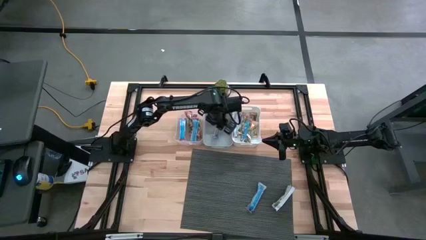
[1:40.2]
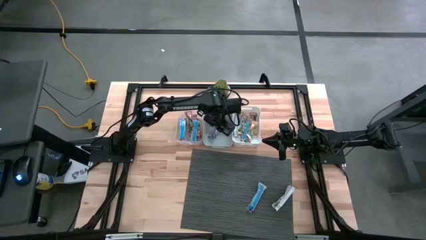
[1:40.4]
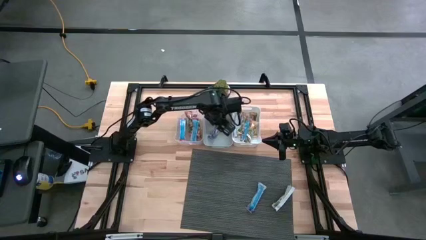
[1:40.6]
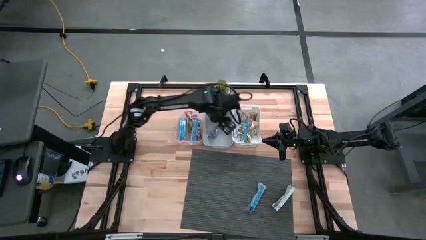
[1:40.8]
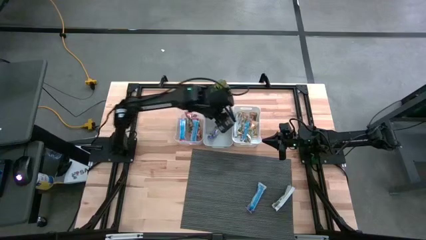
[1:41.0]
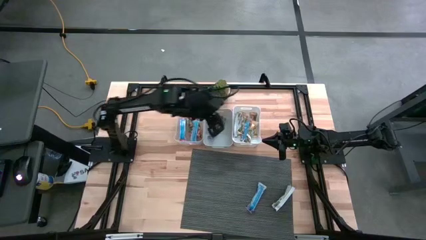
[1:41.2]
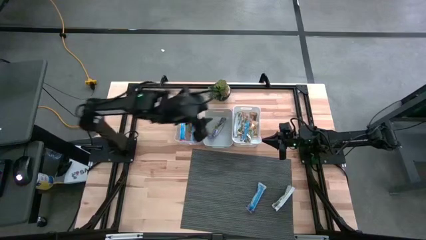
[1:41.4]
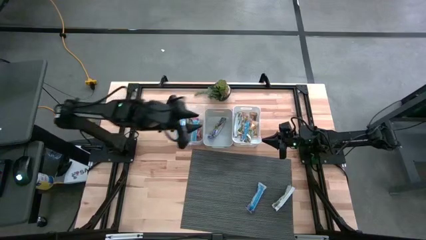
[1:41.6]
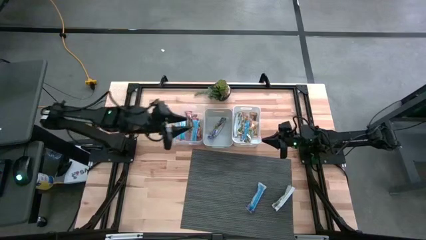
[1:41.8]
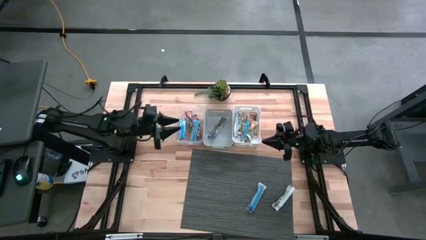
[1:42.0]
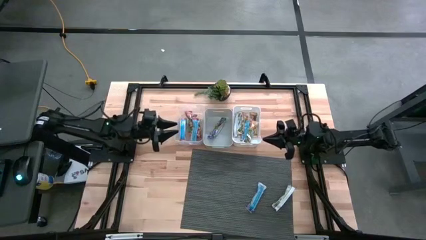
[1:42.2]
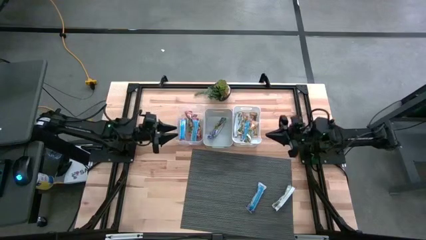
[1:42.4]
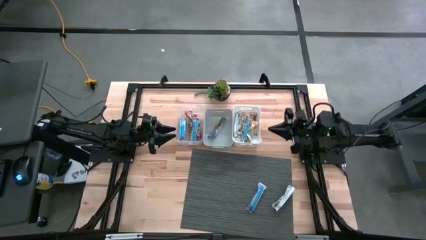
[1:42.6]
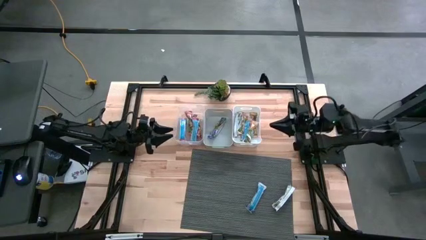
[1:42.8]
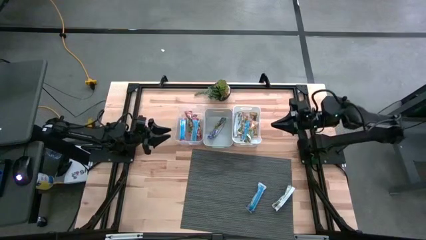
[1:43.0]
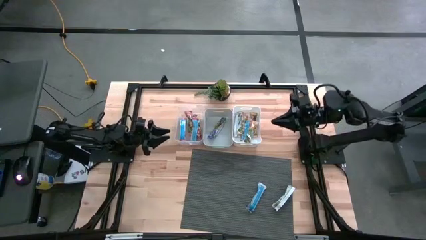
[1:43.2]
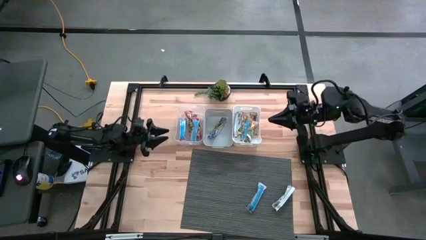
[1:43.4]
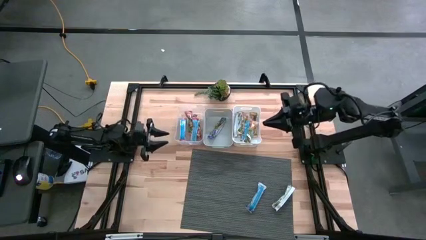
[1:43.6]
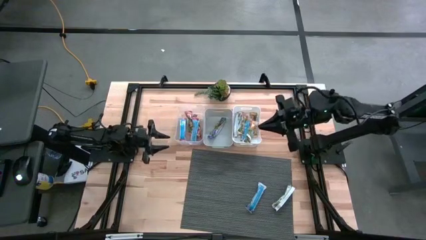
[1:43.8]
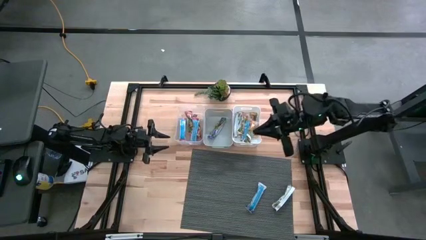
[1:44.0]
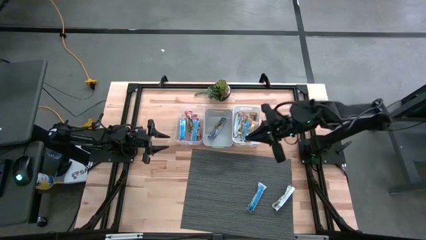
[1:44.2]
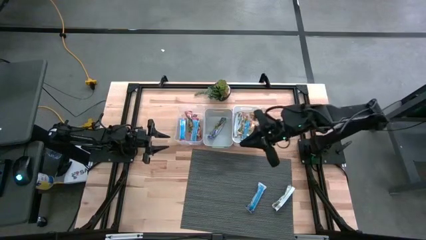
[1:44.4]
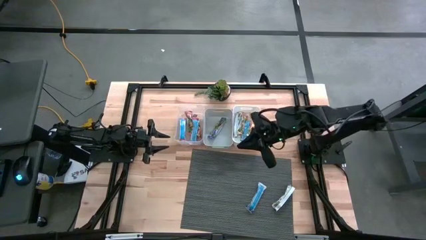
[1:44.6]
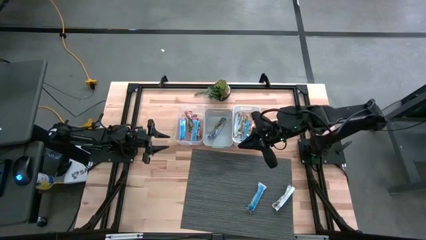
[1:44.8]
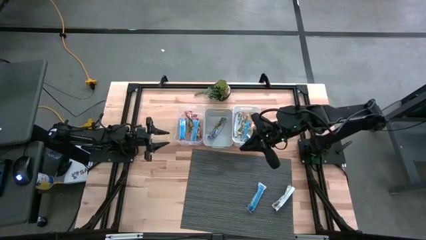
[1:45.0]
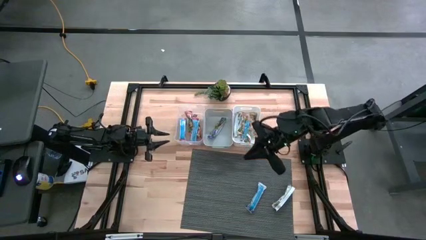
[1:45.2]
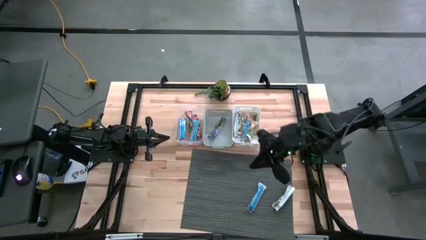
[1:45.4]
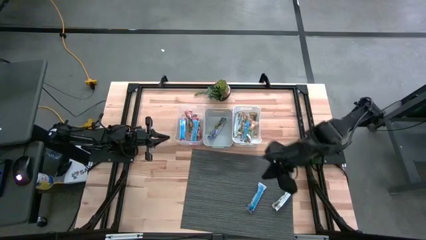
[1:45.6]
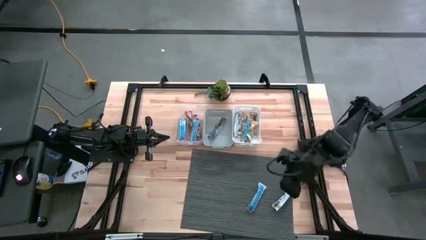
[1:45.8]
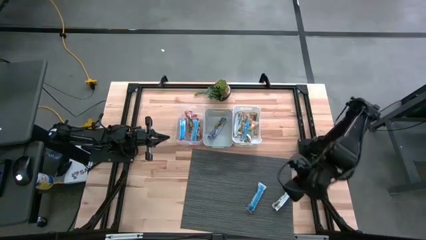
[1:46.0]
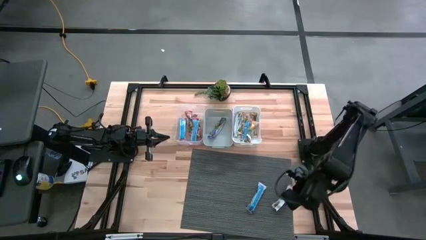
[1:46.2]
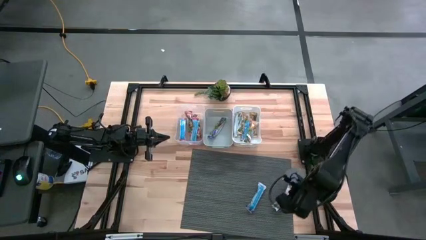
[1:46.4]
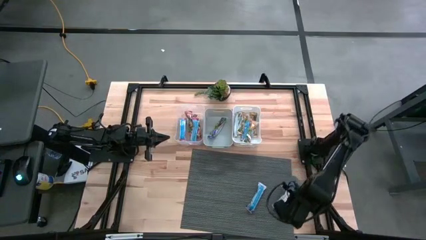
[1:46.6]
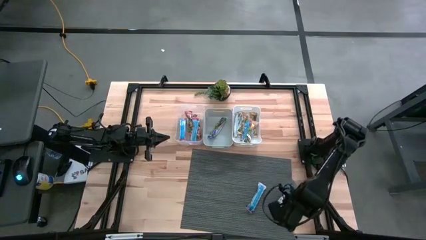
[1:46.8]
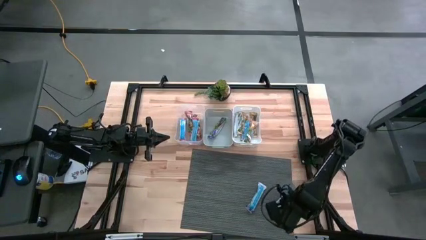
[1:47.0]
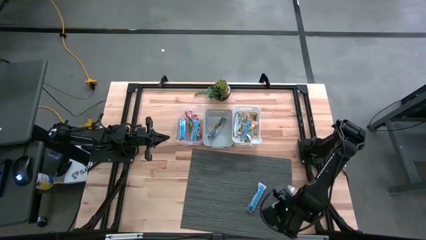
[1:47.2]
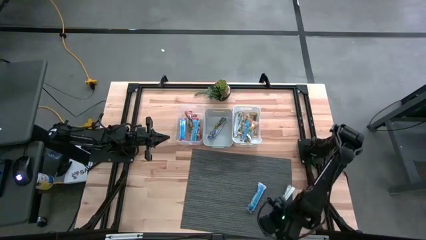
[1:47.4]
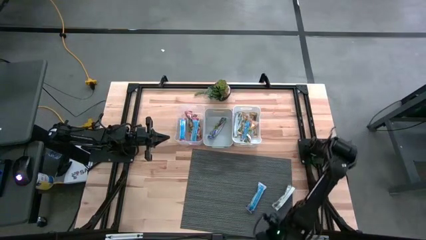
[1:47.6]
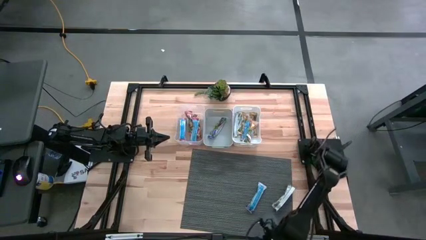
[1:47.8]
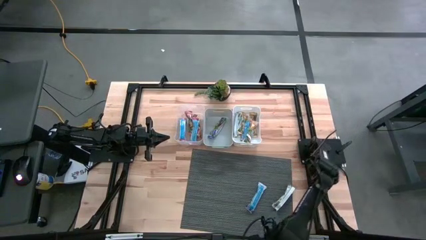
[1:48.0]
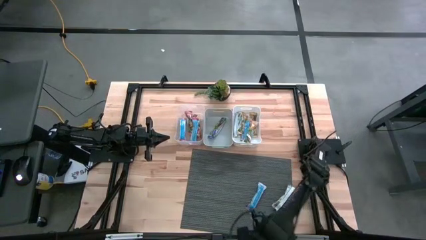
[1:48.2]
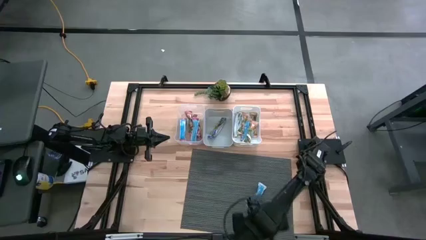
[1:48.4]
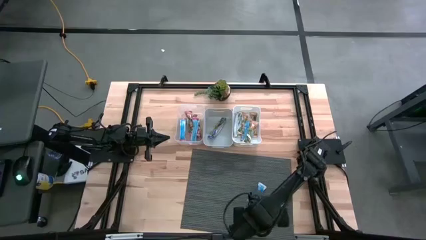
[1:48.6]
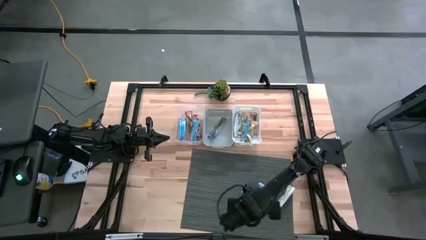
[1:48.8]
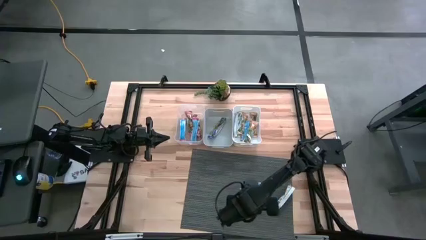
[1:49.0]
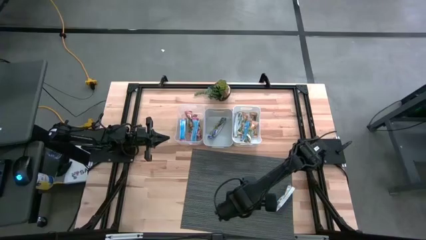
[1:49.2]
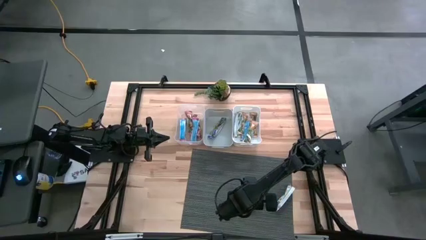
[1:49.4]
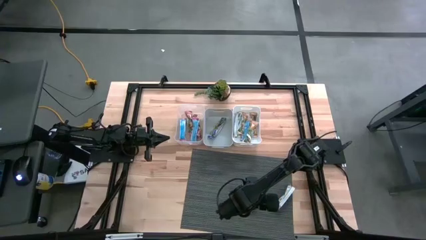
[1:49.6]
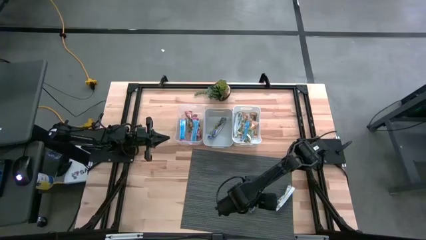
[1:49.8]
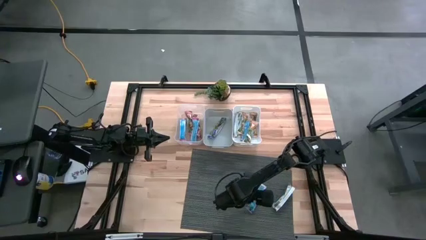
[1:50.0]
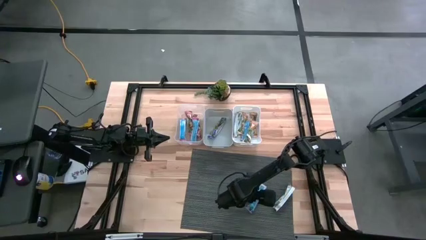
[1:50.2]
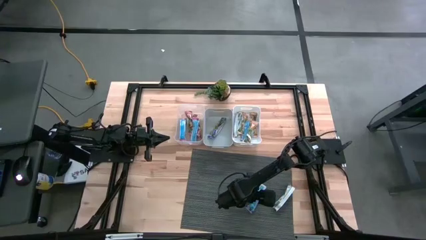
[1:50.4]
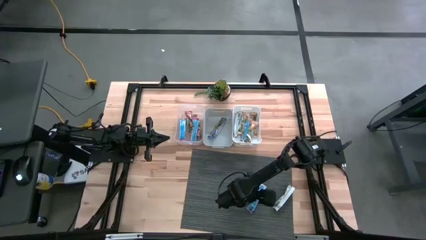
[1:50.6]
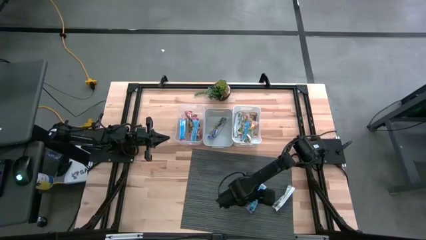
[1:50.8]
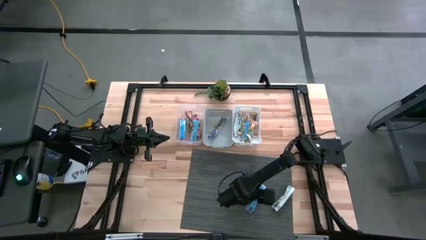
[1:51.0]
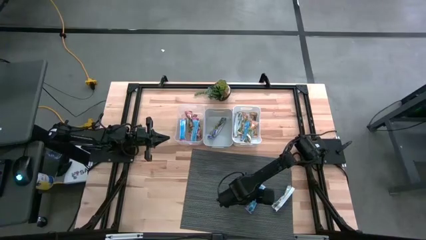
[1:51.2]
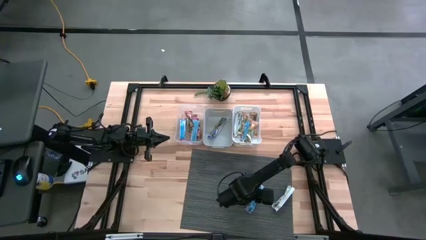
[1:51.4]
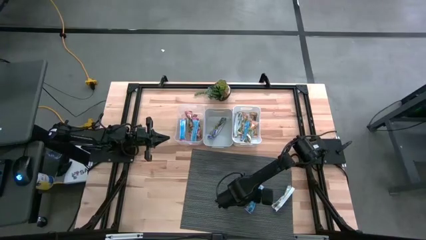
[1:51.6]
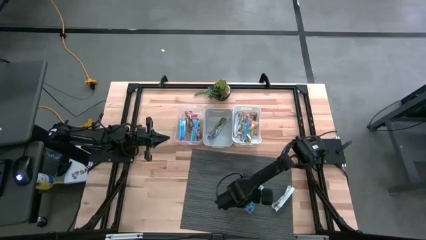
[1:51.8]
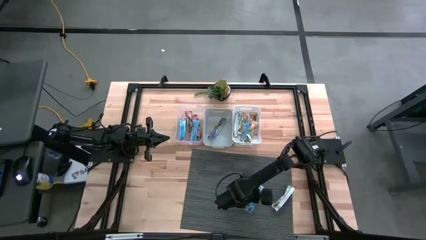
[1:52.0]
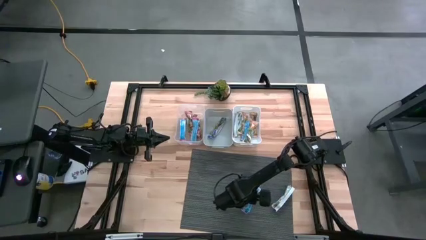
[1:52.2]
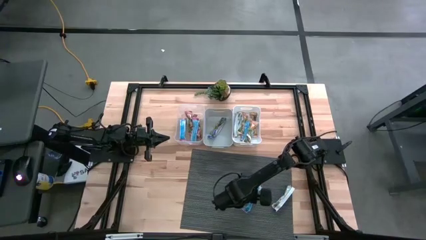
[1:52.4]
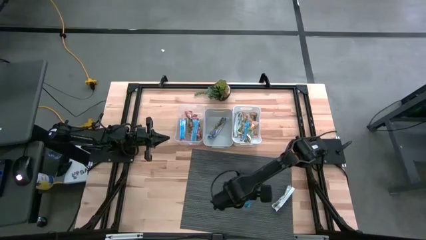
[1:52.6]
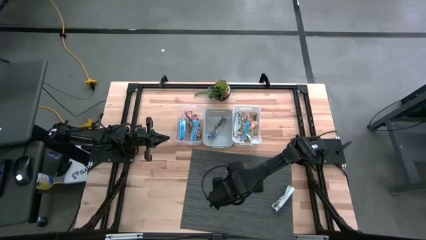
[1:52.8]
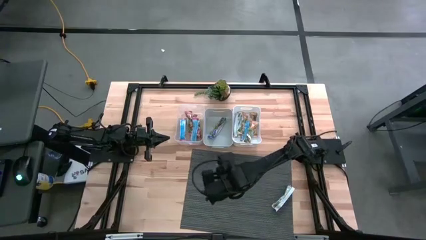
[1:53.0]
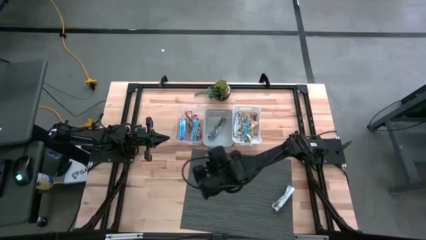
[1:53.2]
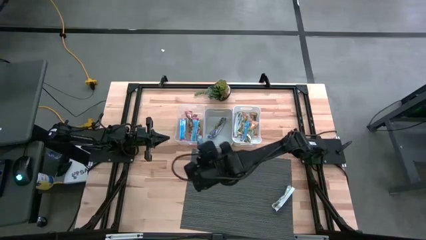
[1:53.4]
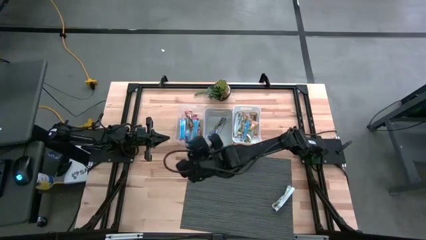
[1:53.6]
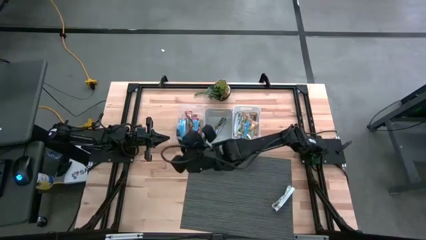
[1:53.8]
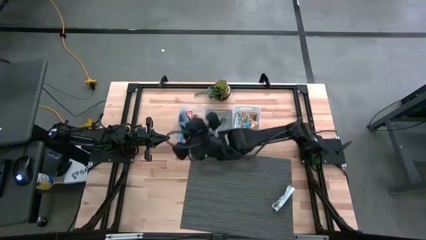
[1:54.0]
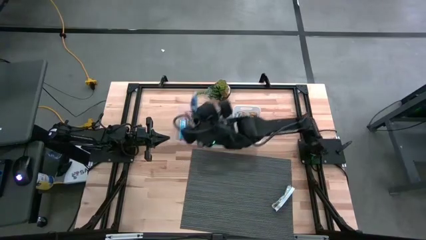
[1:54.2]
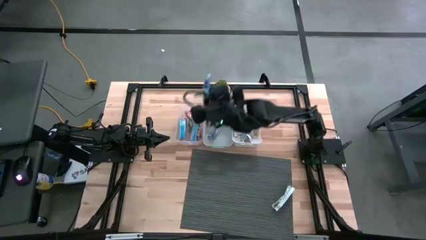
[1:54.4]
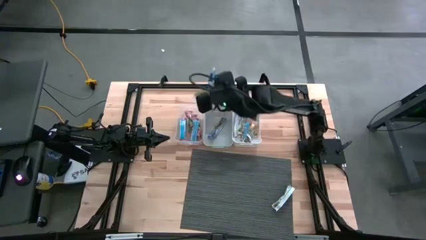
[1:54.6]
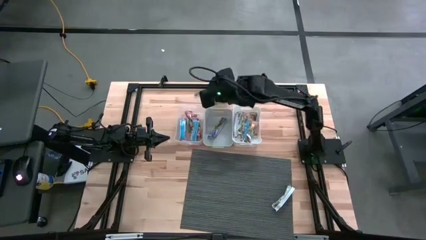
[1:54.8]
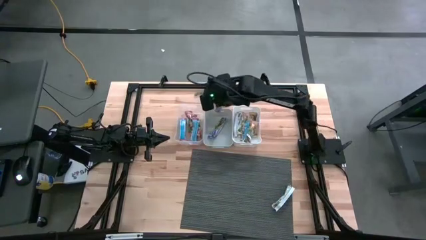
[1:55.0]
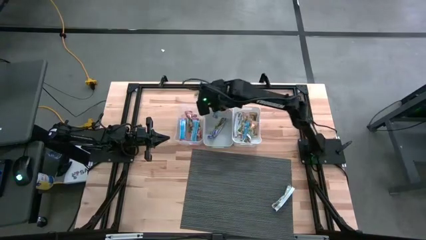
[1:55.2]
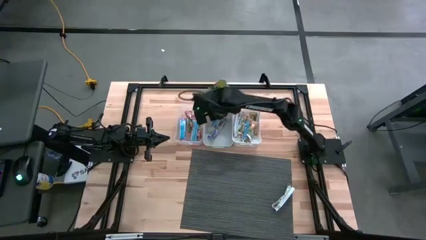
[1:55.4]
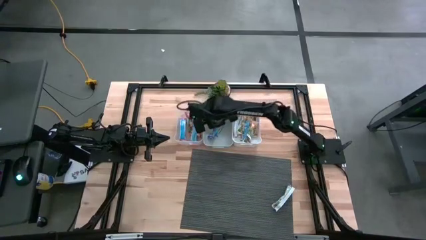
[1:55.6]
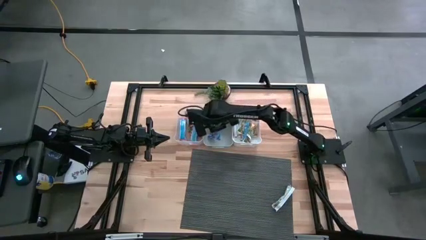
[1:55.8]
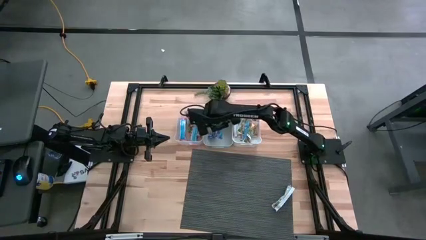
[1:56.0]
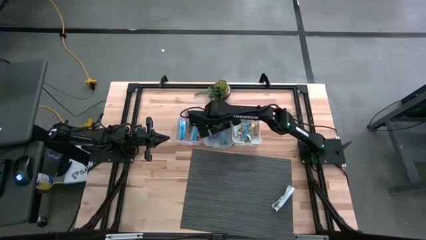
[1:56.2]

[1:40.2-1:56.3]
Task: Pick and place Granola Bars by type
Put the blue granola bar into the gray bin
